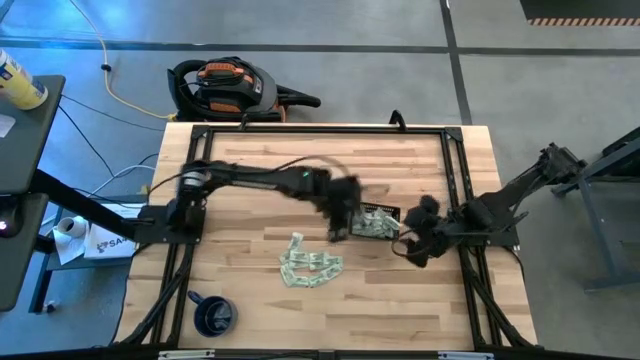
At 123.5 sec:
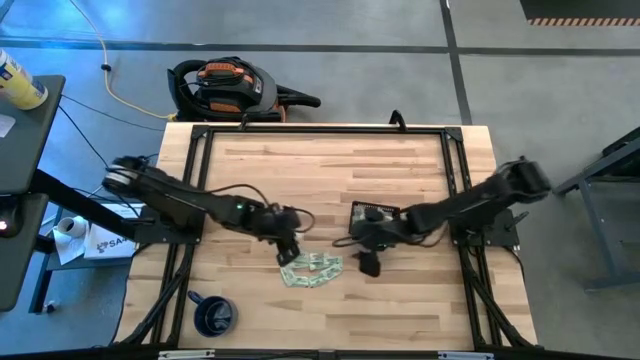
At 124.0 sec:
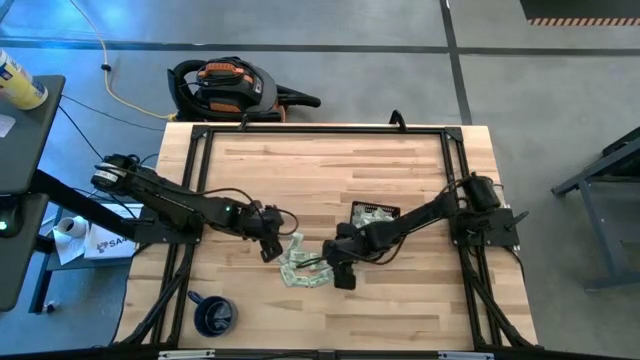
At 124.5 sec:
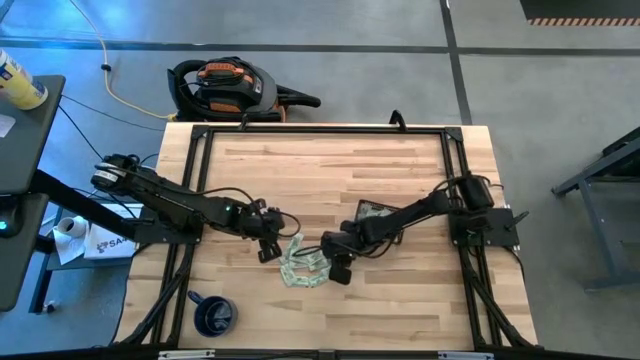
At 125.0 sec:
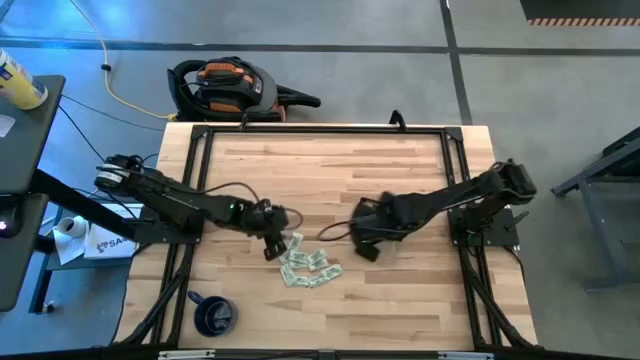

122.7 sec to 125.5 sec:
Task: Pick and place Stevia / Truvia into bins
Put the stevia packet into the black bin

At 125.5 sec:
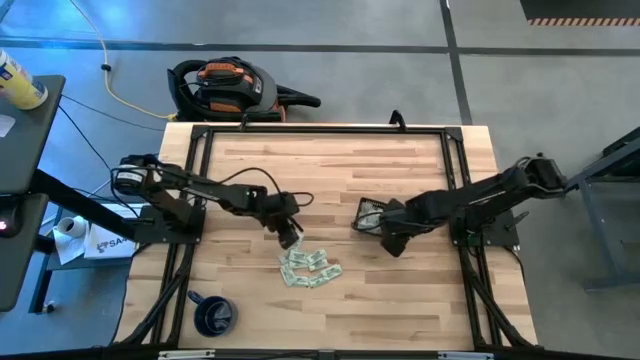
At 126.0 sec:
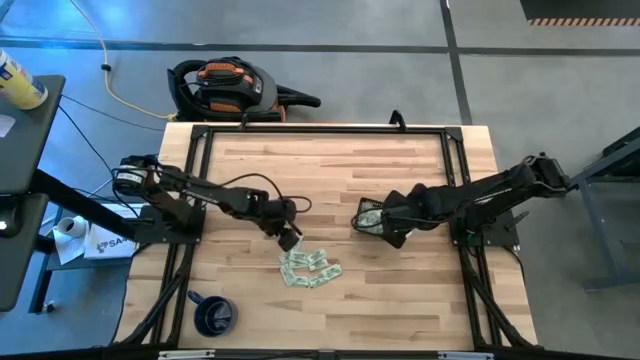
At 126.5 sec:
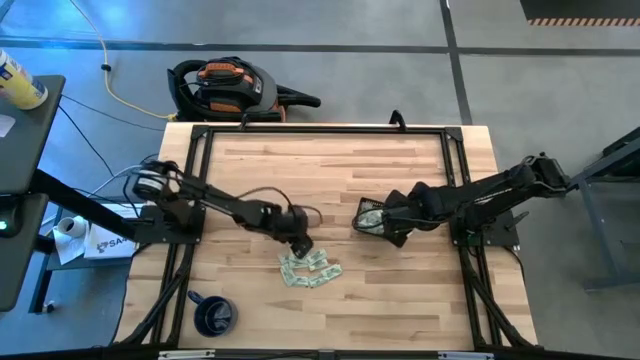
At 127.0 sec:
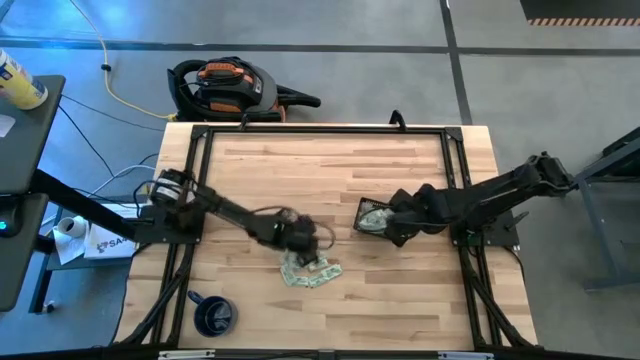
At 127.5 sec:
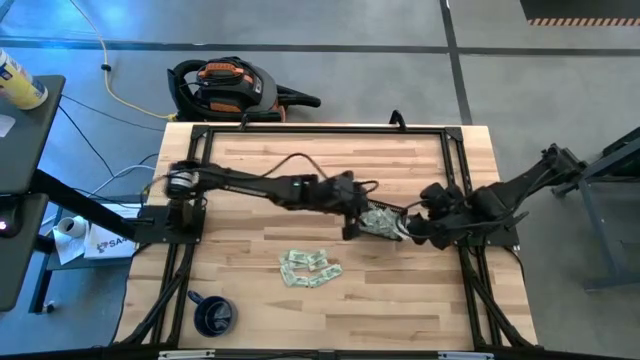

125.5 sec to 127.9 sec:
Put the stevia packet into the black bin

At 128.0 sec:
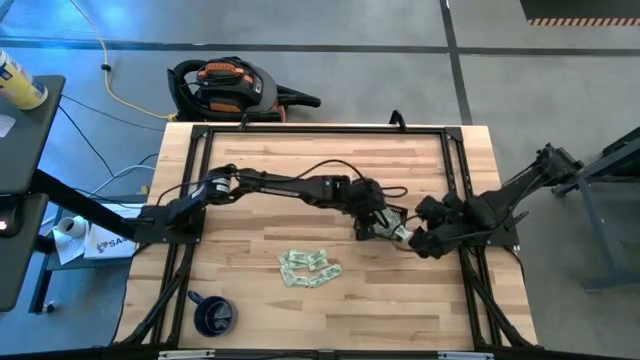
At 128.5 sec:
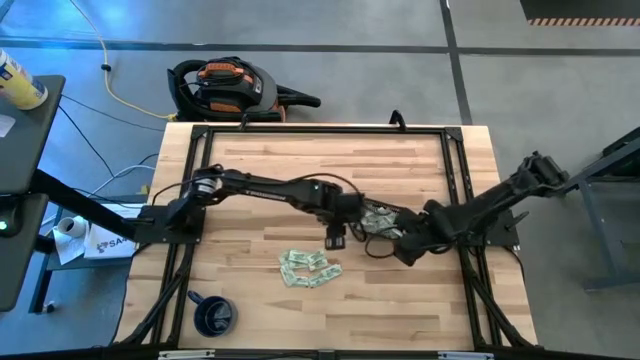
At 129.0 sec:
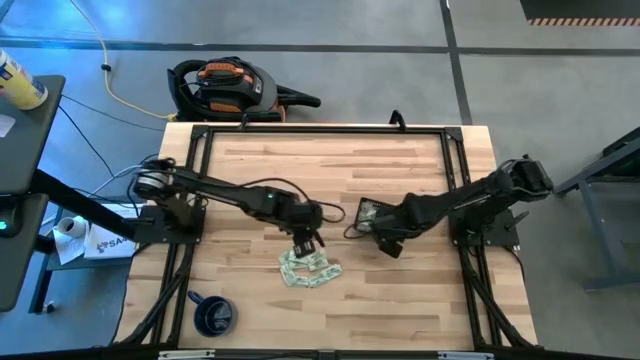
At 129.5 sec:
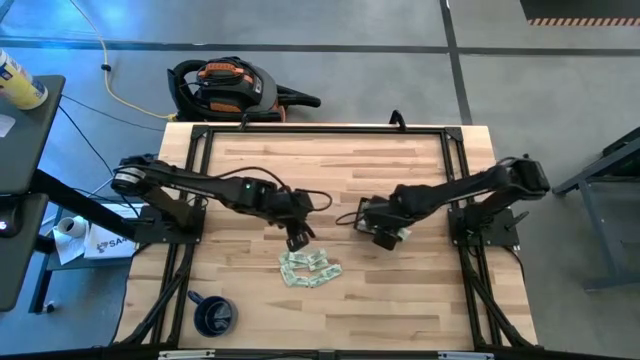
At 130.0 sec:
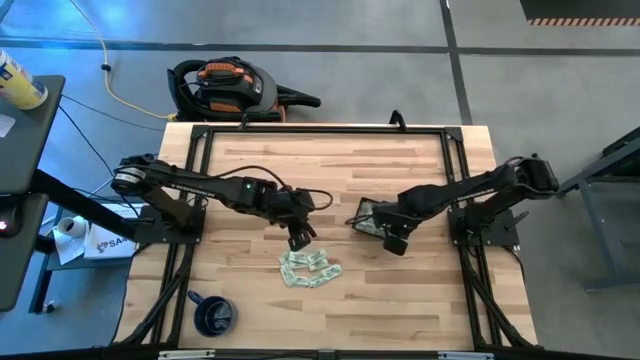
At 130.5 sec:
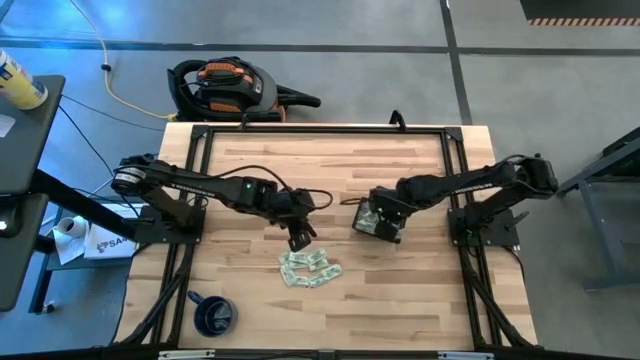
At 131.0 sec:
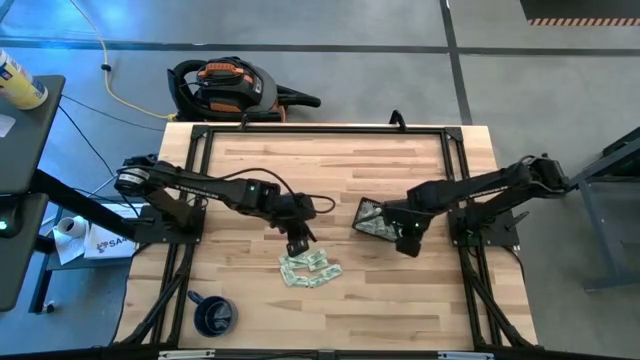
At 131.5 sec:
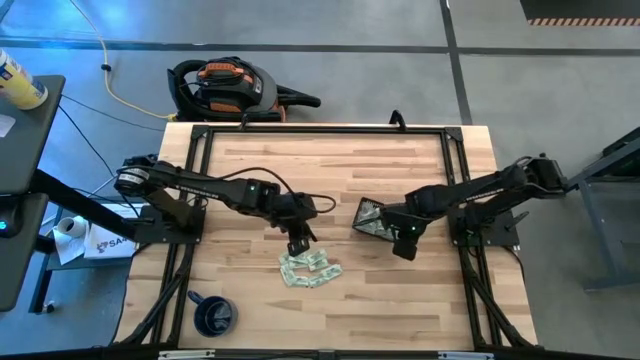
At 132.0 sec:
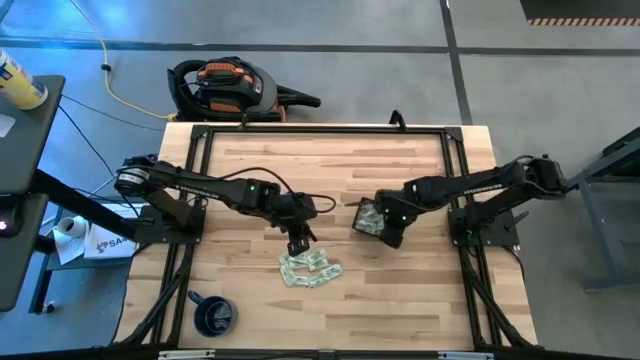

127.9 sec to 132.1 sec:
Adjust the stevia packets in the black bin

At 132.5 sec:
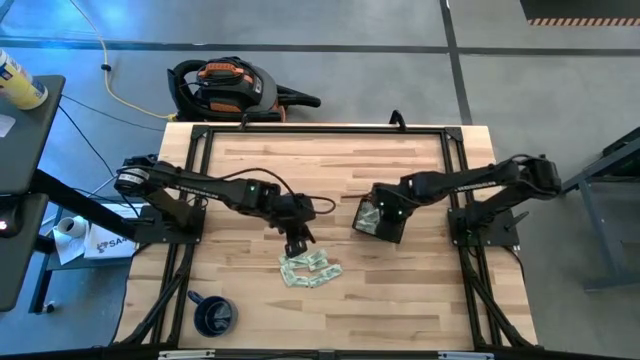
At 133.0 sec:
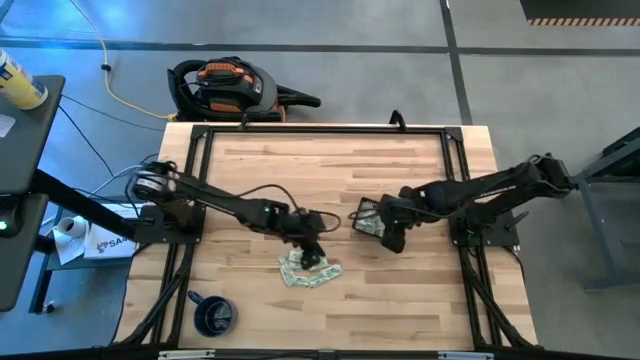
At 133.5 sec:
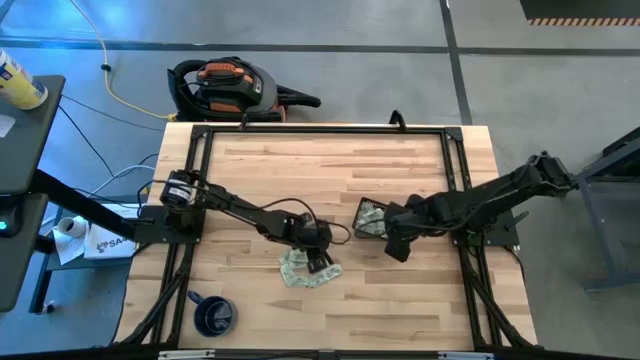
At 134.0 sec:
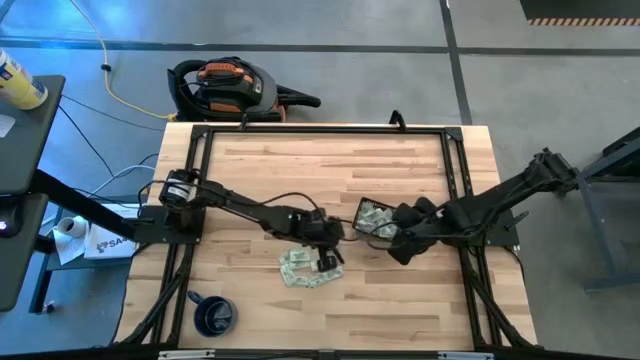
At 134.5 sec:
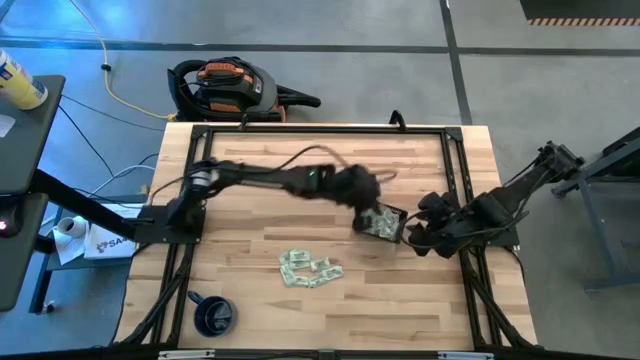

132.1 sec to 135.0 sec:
Put the stevia packet into the black bin

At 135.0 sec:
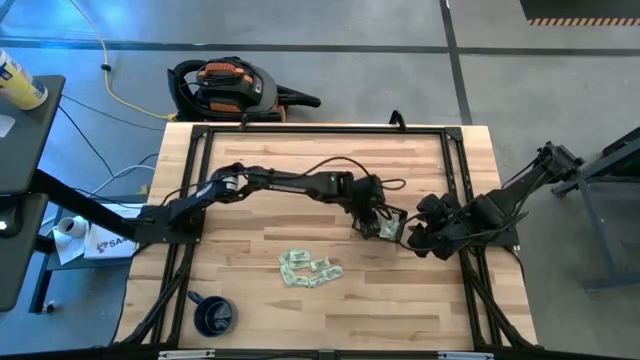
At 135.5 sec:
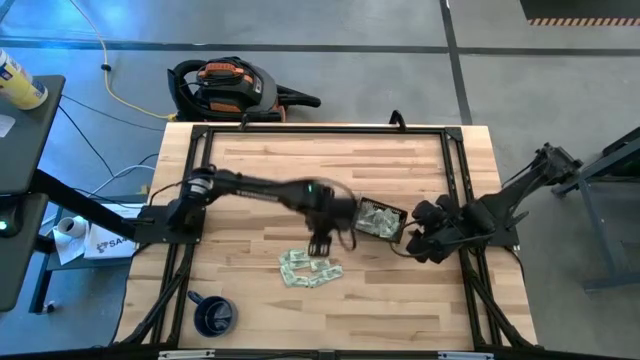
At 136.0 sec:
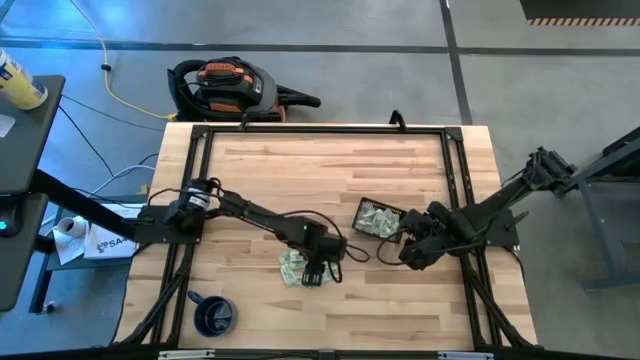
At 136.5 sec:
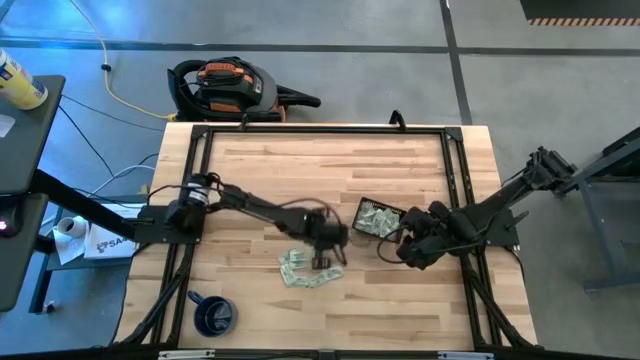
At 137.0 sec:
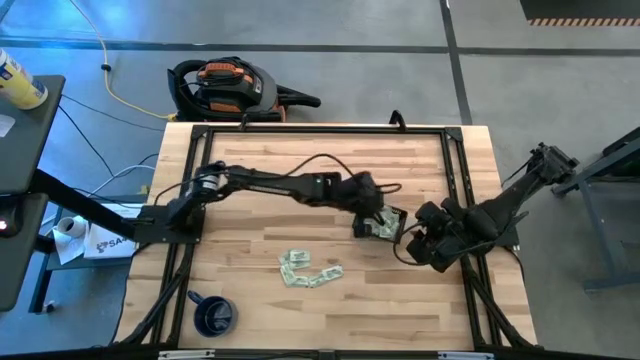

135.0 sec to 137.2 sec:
Put the stevia packet into the black bin

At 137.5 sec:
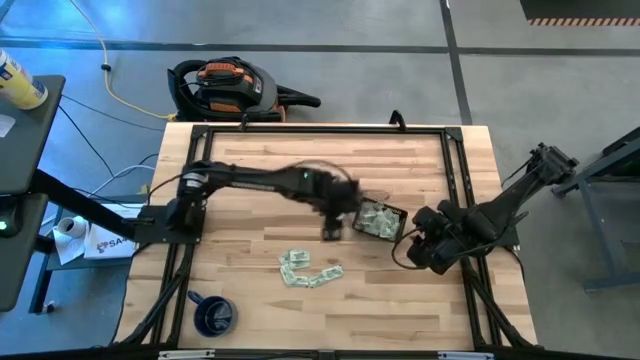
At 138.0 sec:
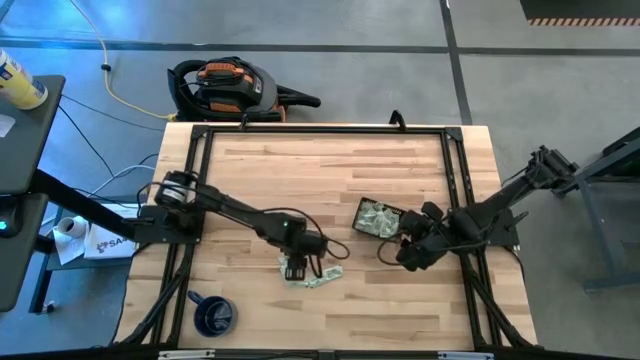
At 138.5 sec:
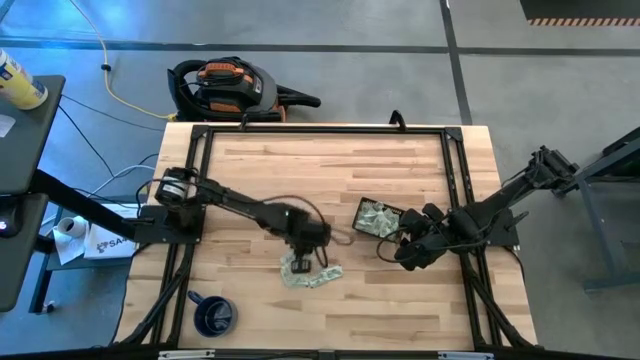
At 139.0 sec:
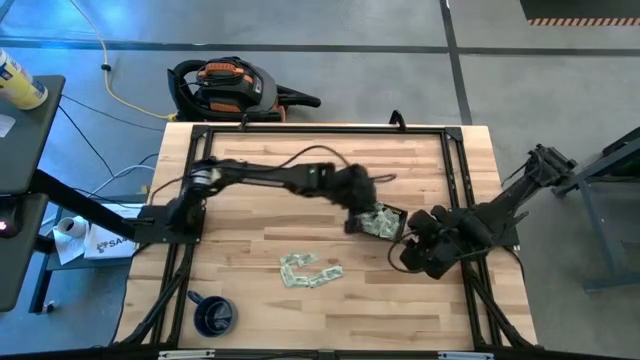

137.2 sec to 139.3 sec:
Put the stevia packet into the black bin

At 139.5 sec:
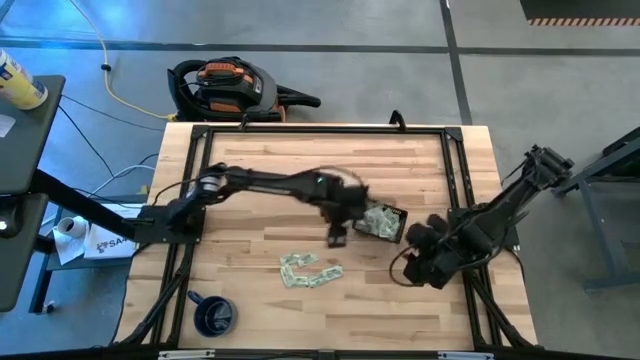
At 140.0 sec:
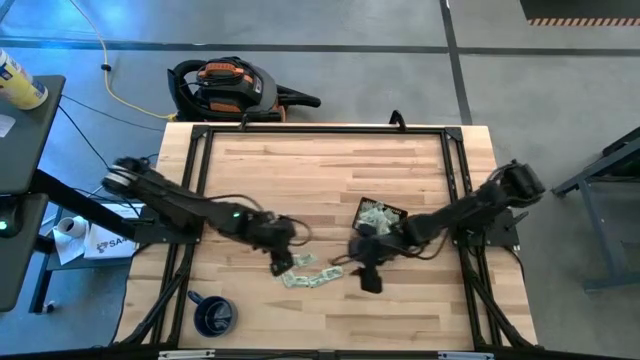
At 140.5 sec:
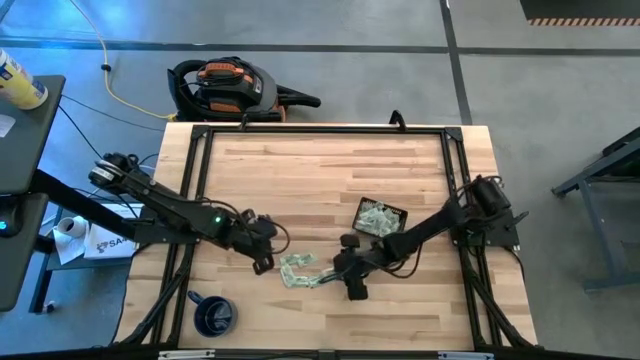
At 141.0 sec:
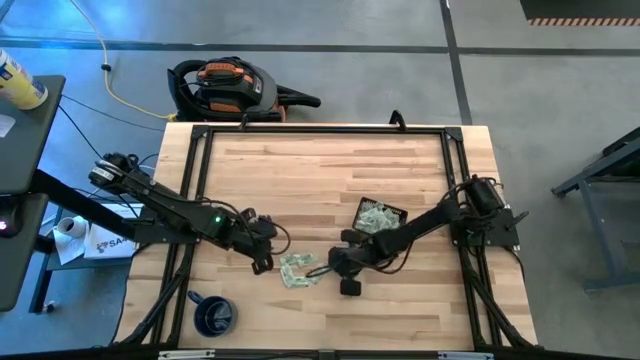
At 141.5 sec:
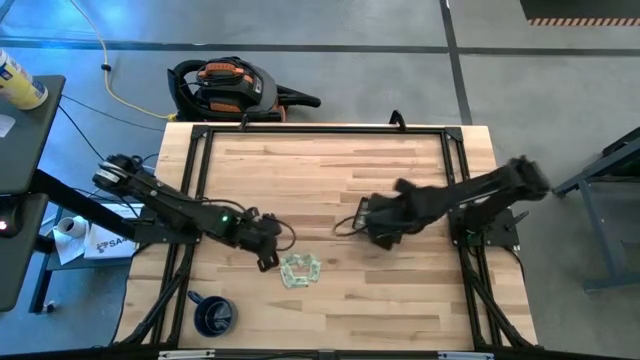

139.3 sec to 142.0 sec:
Put the stevia packet into the black bin

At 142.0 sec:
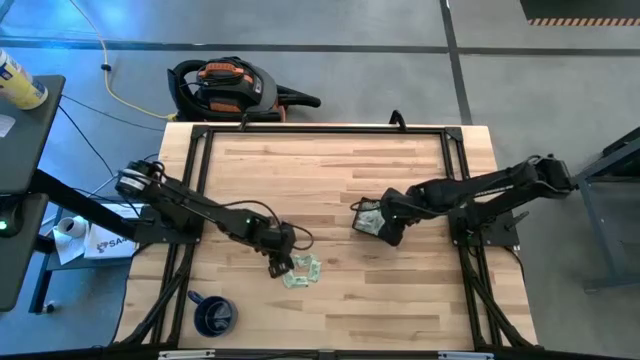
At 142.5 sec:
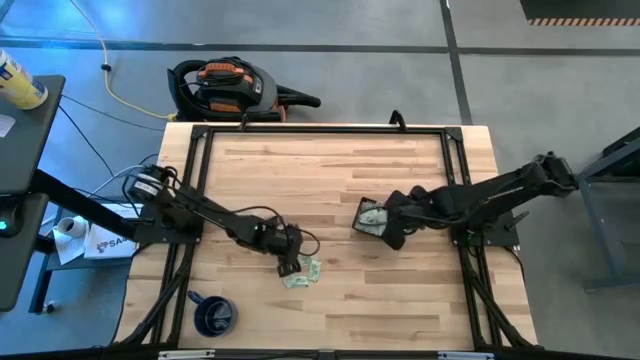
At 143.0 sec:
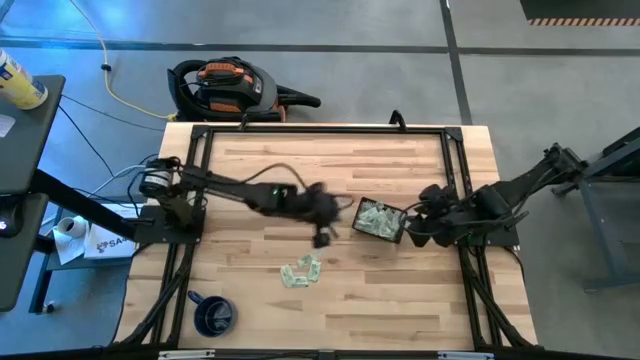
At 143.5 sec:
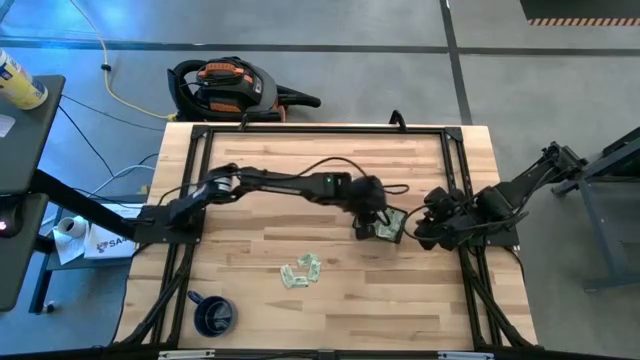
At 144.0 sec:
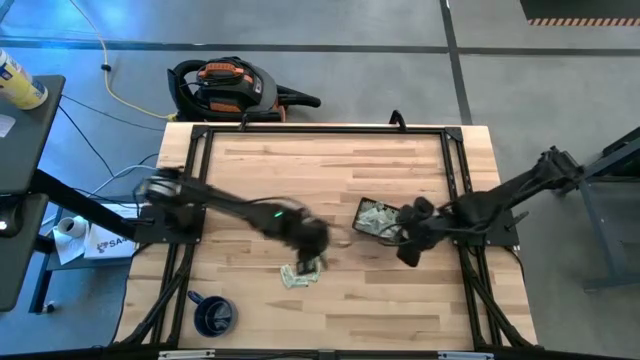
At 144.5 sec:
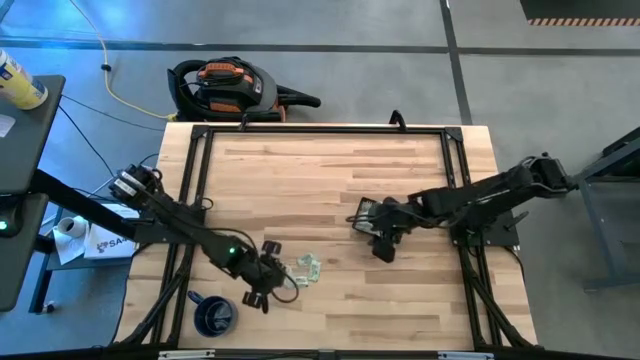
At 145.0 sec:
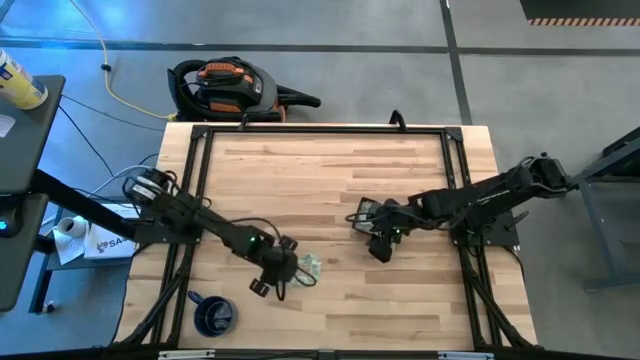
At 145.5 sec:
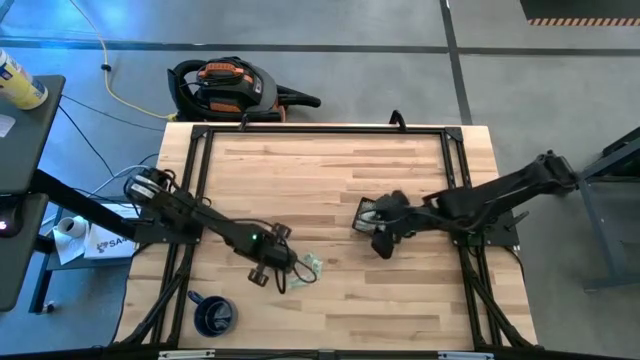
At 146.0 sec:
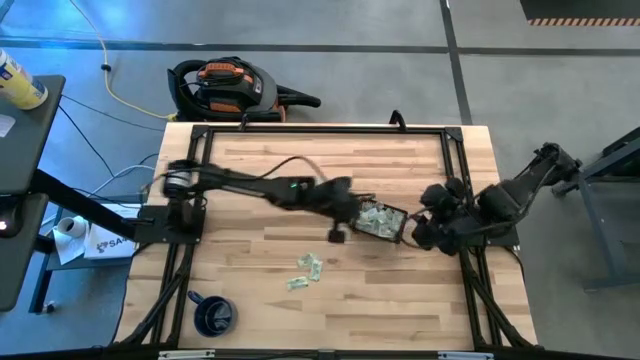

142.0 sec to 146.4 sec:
Put the stevia packet into the black bin
